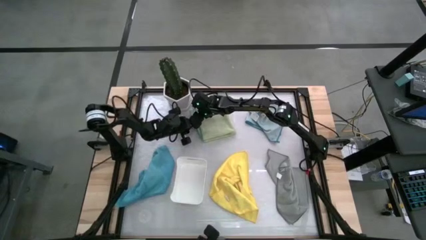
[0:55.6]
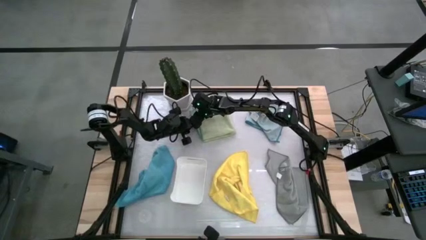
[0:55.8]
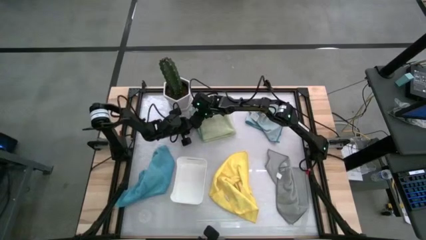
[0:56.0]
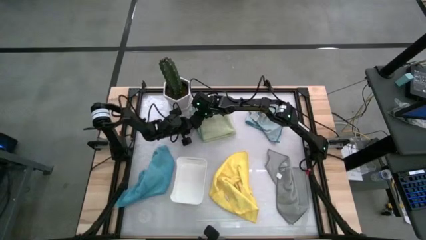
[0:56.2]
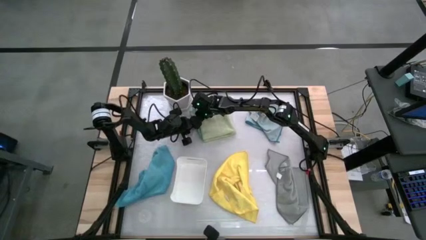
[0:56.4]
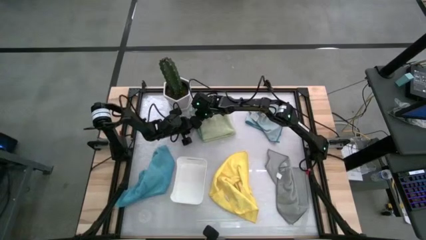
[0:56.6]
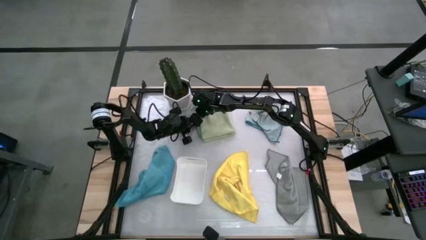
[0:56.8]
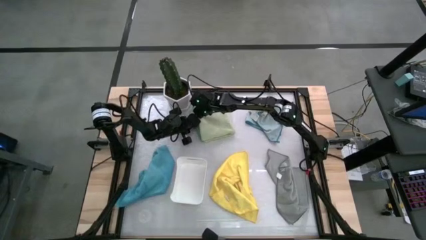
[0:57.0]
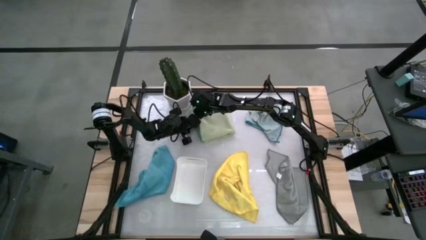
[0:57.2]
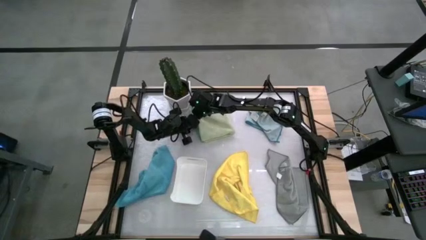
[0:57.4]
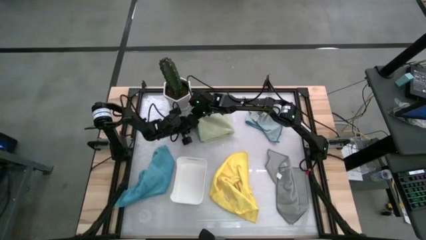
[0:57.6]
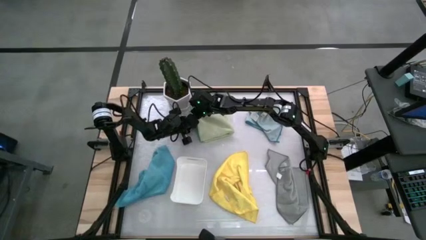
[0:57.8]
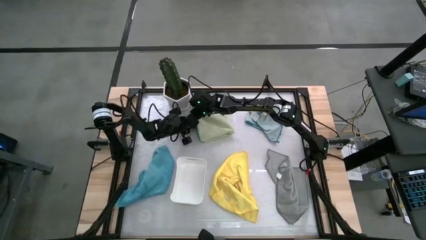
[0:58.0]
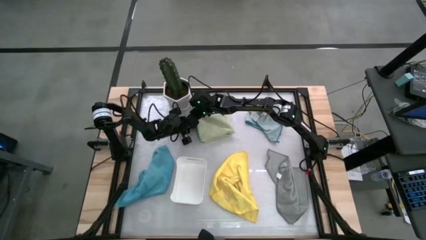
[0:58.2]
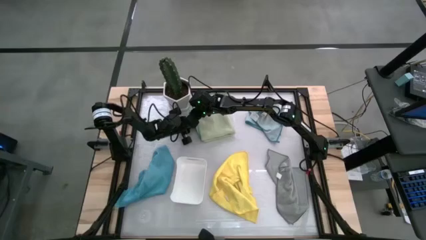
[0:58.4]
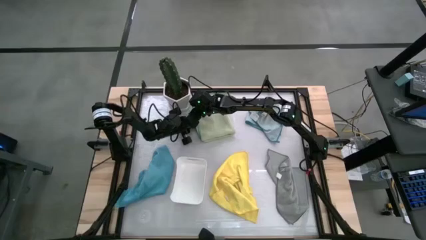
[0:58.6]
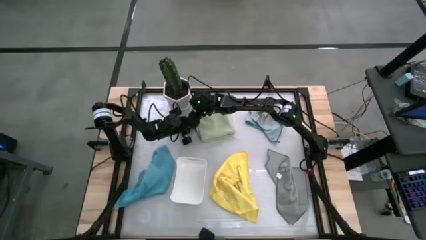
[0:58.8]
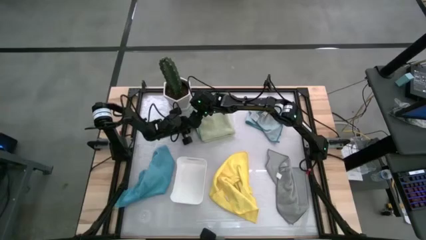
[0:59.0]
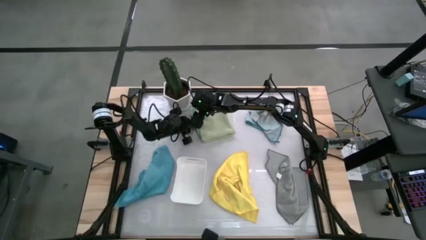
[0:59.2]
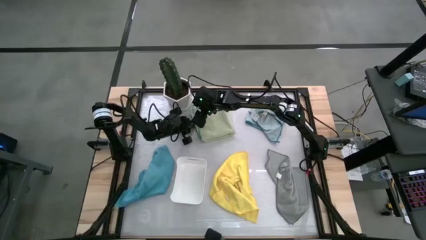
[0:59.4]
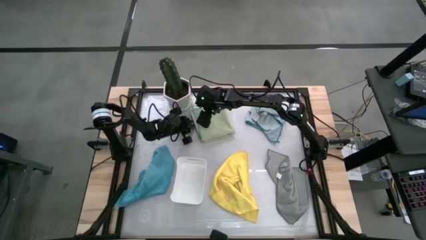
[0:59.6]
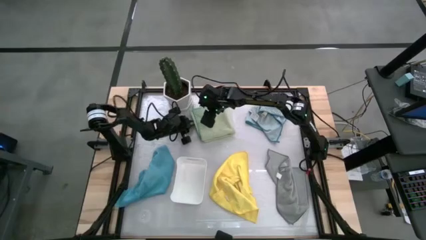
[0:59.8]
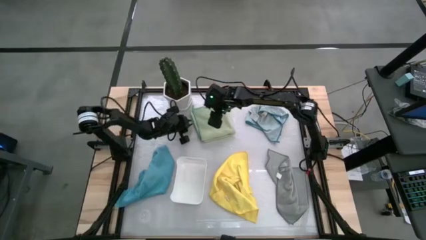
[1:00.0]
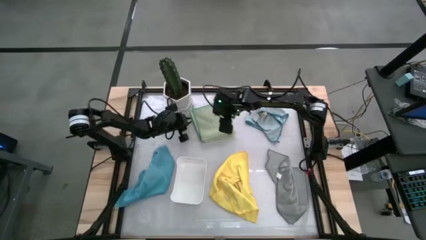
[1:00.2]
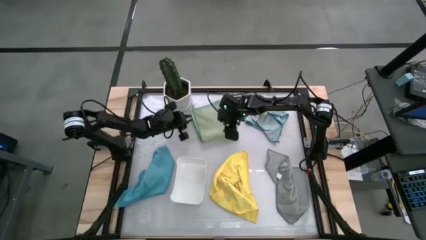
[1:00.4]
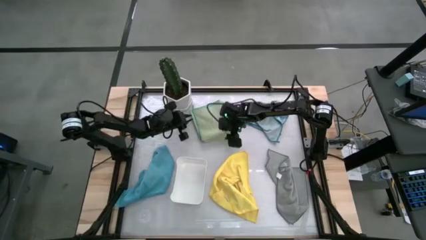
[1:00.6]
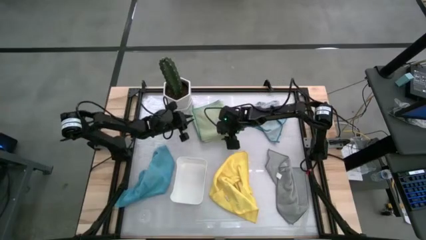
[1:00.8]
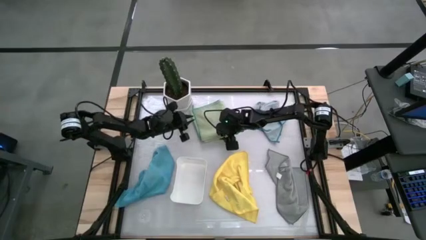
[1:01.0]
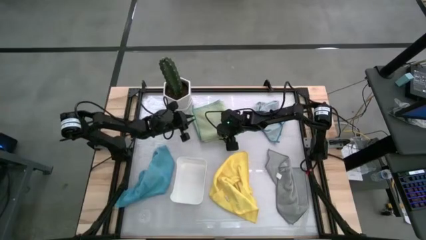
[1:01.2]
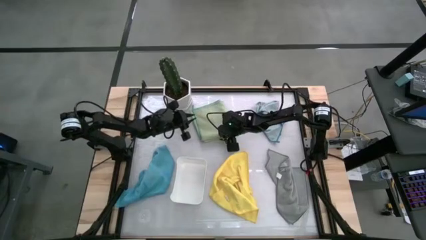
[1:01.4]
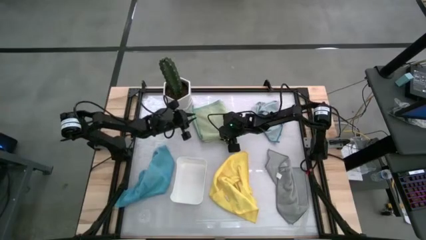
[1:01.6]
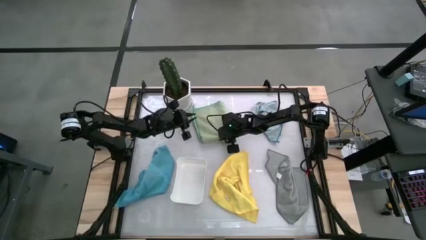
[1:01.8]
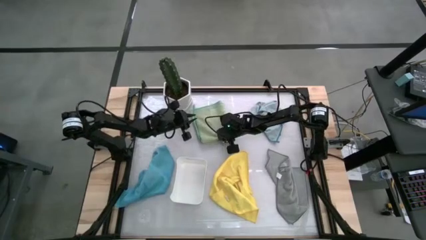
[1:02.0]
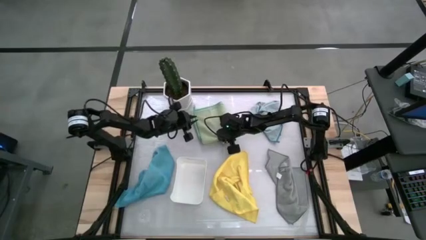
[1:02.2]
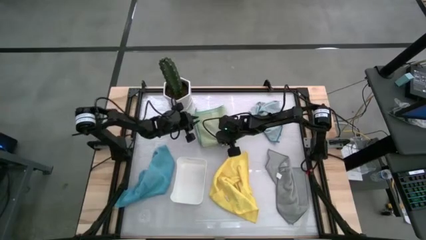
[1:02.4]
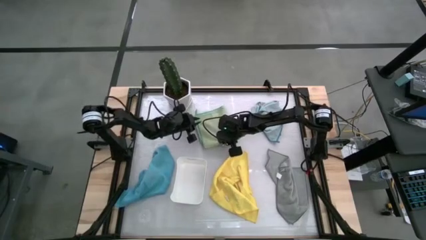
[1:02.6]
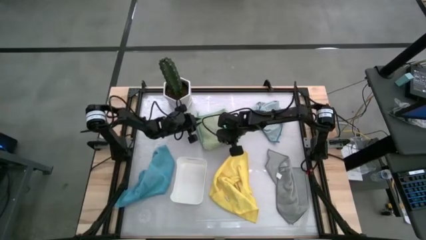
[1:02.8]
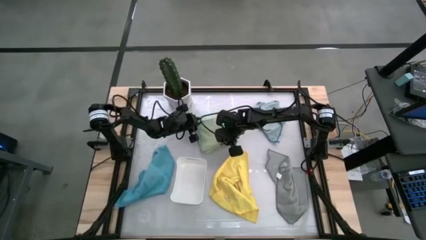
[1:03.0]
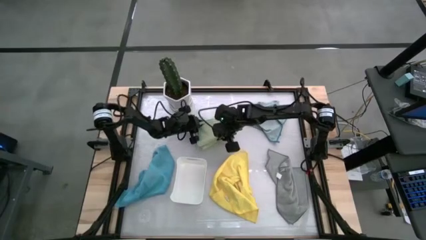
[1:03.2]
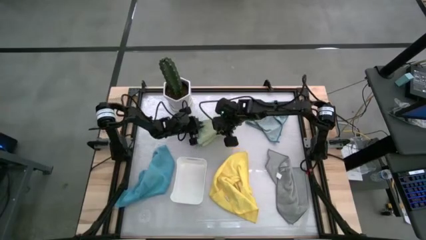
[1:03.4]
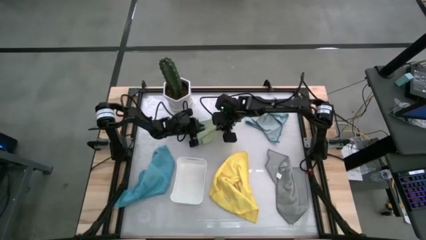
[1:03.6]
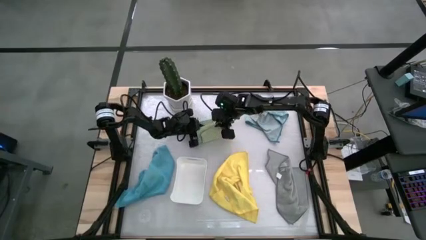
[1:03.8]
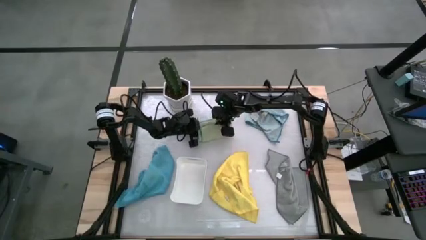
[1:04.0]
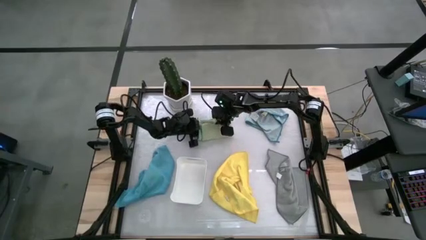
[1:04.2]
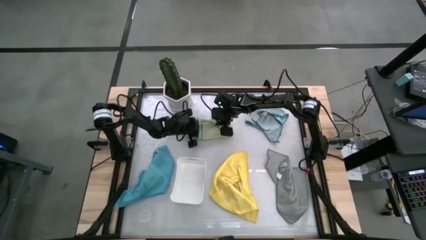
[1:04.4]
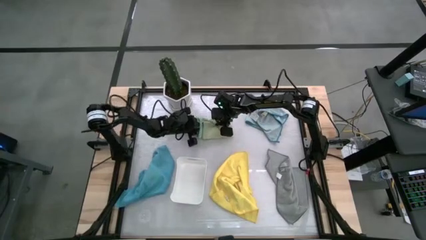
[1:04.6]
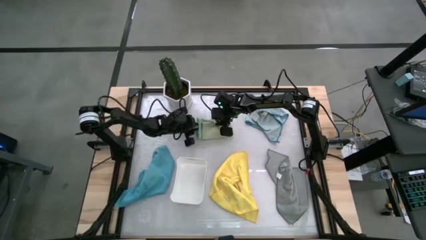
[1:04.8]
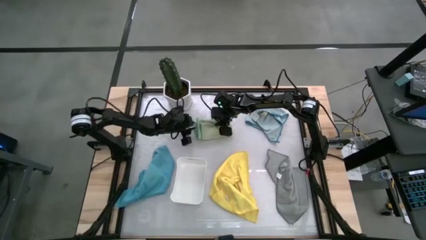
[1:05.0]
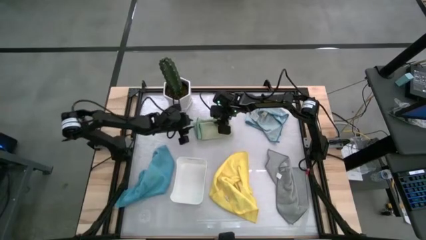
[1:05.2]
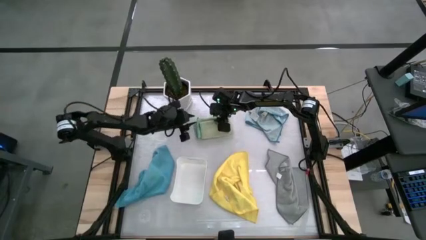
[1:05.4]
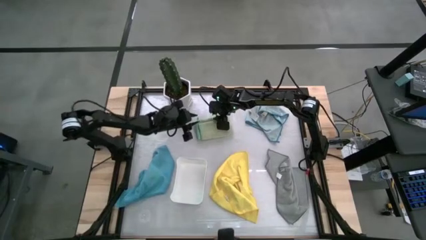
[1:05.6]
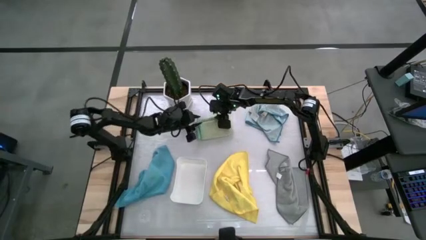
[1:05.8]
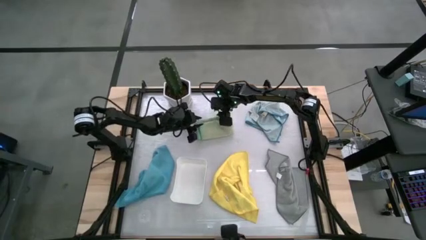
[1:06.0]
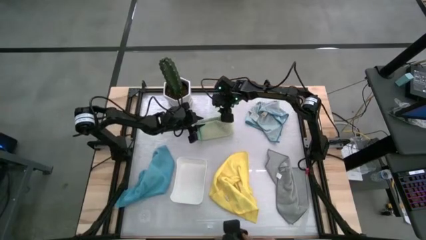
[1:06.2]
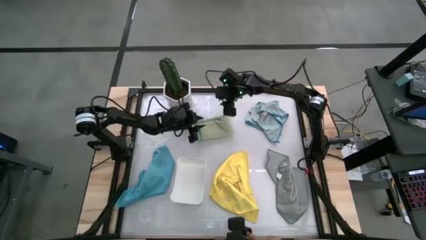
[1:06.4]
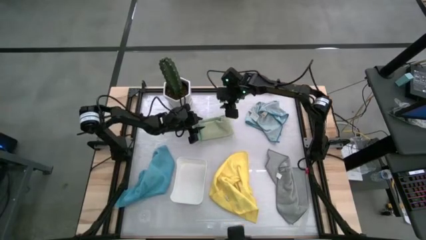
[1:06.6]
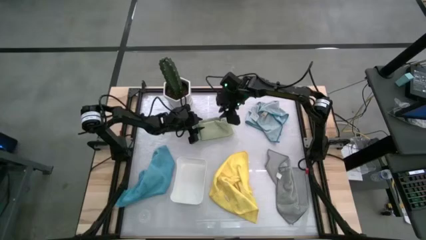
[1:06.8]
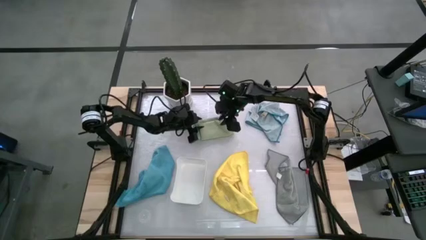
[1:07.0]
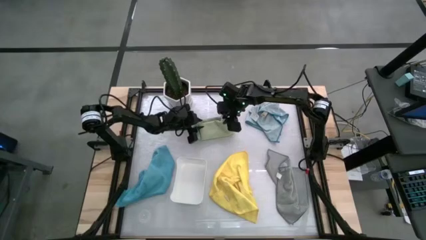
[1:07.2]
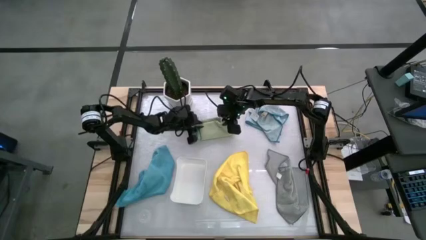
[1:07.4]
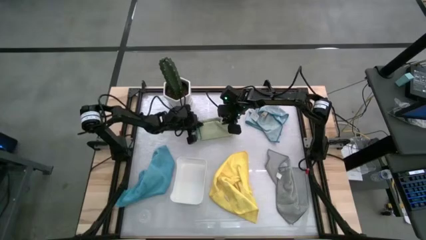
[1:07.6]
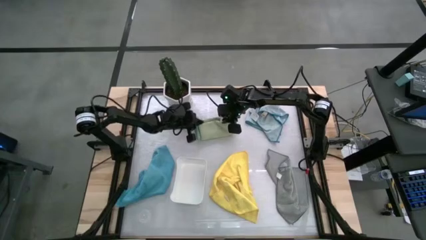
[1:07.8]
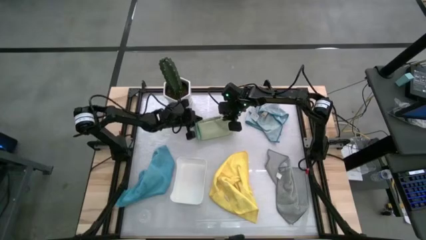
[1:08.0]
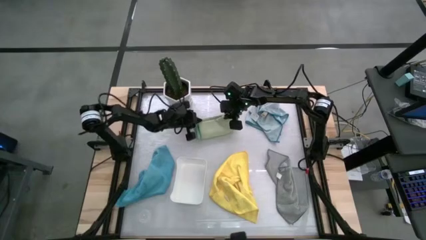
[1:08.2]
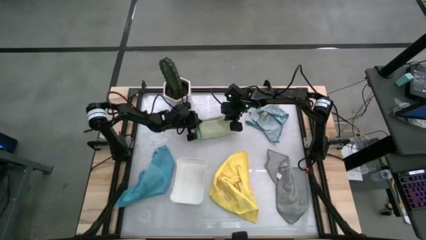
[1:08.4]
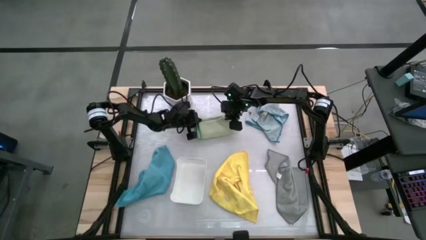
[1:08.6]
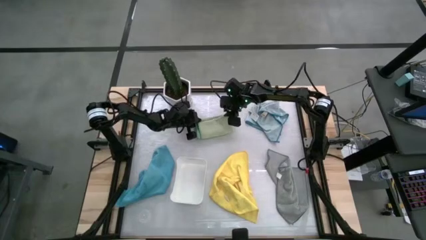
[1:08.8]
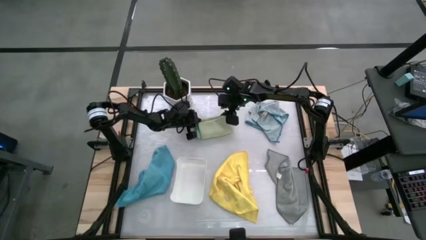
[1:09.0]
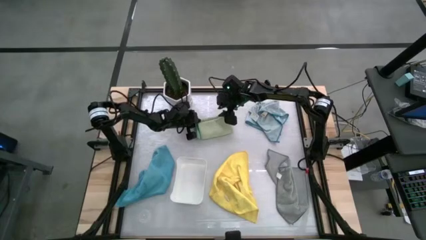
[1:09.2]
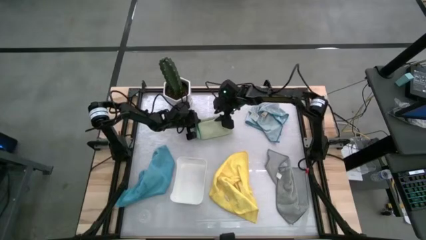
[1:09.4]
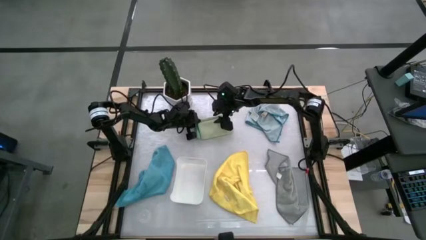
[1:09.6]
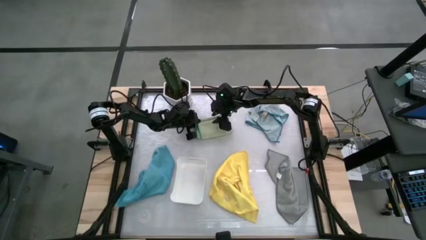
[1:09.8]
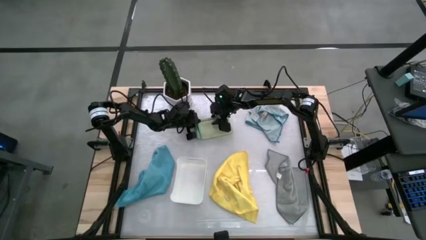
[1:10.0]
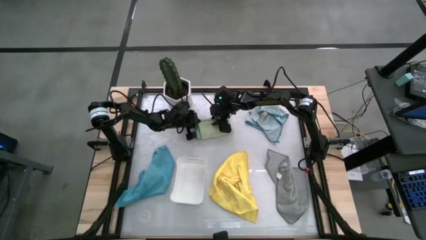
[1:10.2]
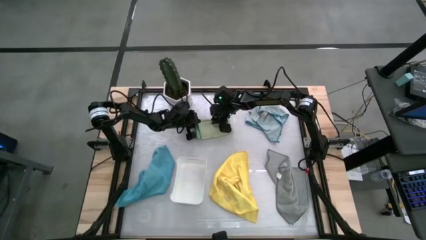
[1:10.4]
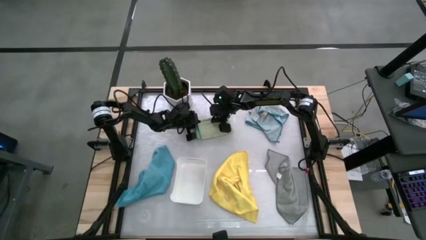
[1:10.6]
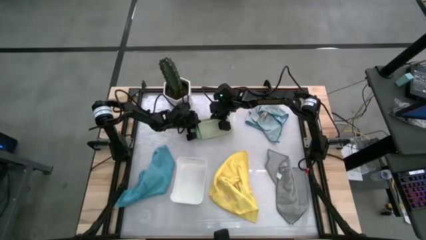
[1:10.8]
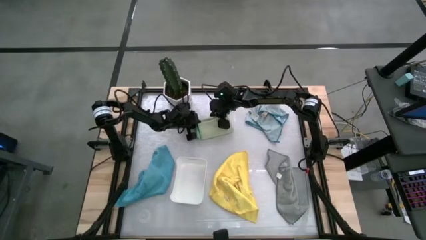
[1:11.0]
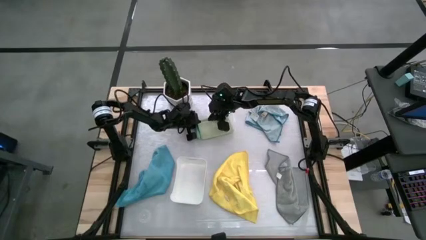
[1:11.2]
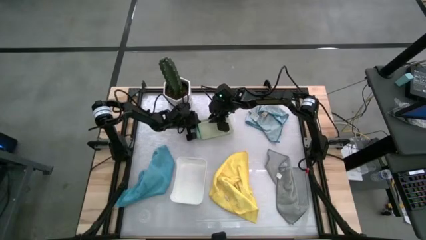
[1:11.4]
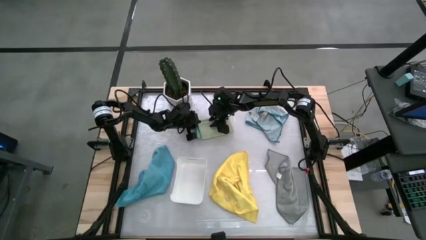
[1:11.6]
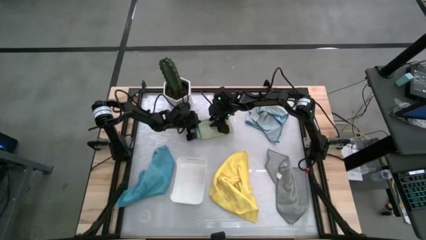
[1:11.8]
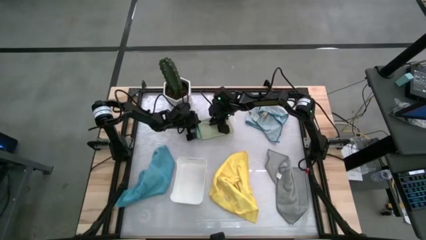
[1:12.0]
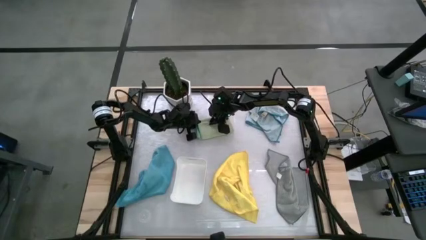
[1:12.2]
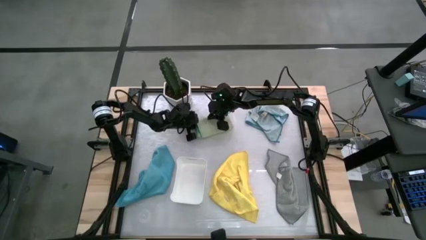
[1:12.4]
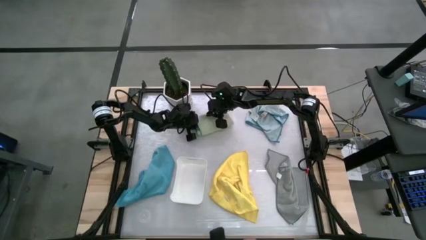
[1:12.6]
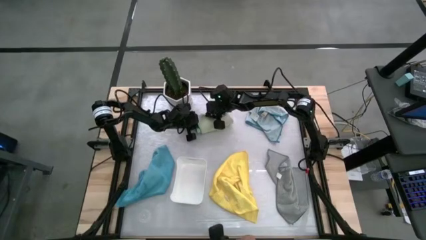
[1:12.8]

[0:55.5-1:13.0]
Task: Fold microfiber towels
Fold the green microfiber towel
